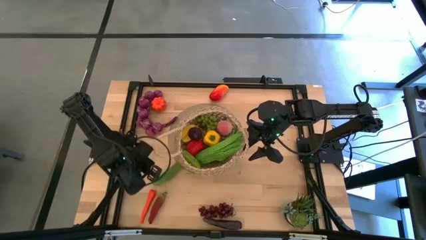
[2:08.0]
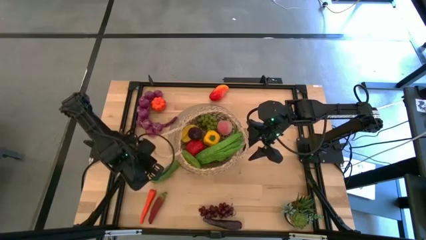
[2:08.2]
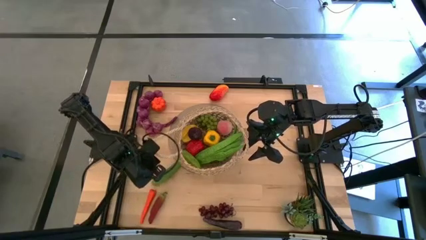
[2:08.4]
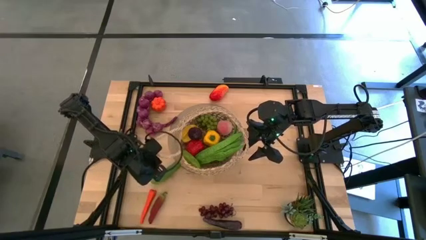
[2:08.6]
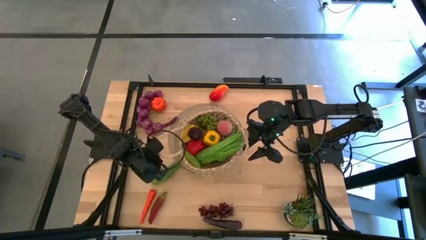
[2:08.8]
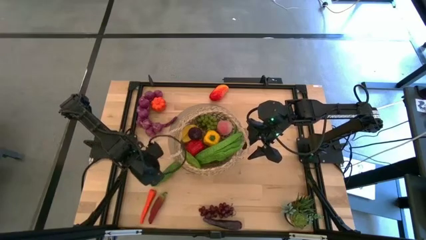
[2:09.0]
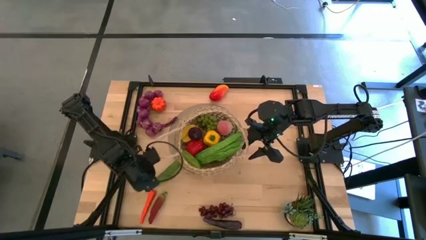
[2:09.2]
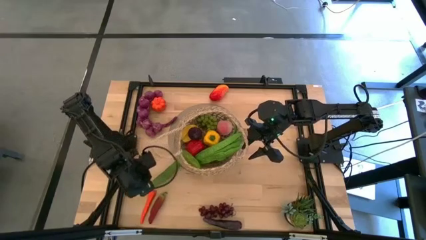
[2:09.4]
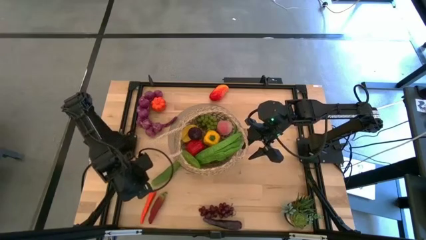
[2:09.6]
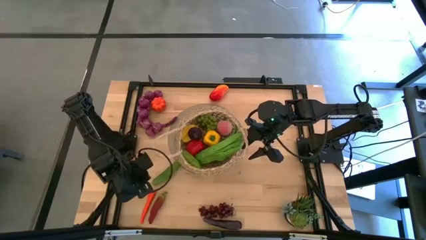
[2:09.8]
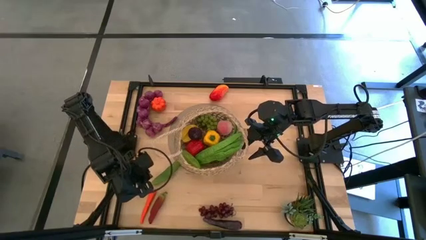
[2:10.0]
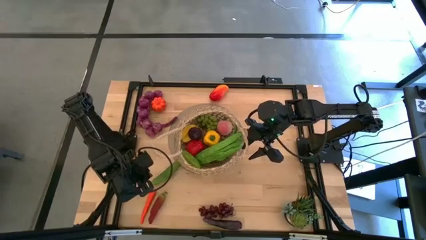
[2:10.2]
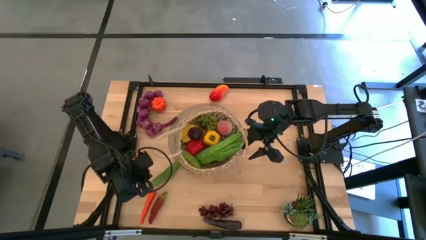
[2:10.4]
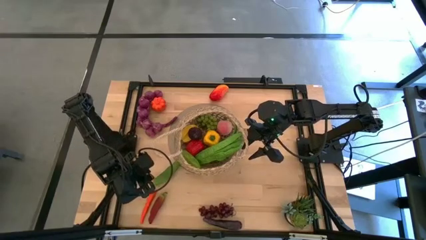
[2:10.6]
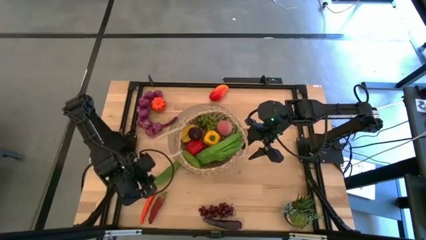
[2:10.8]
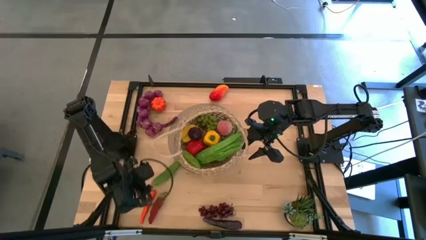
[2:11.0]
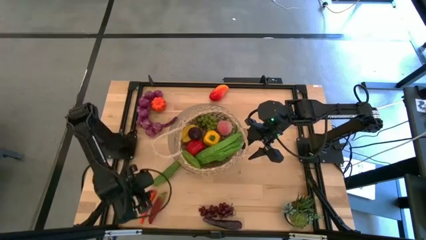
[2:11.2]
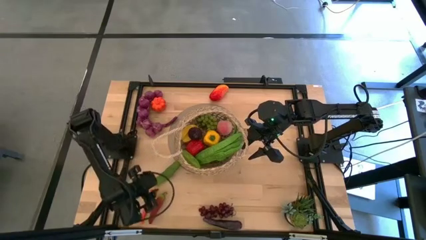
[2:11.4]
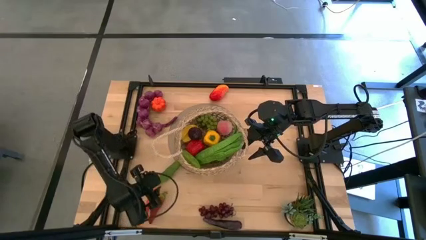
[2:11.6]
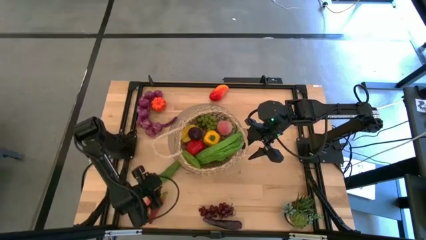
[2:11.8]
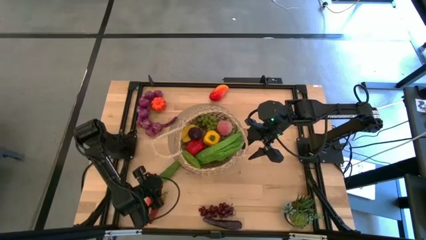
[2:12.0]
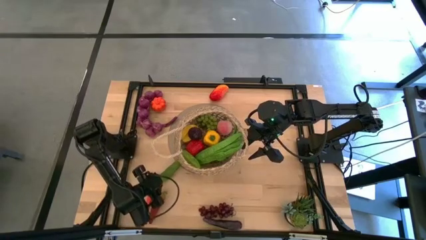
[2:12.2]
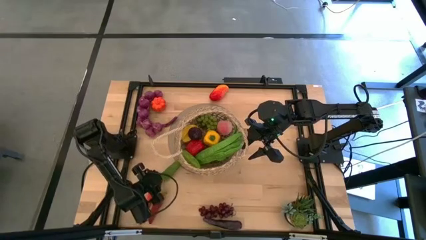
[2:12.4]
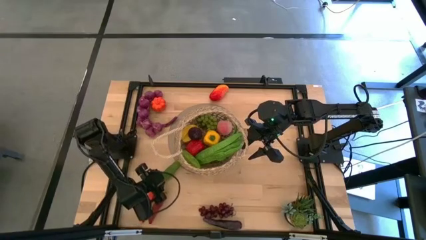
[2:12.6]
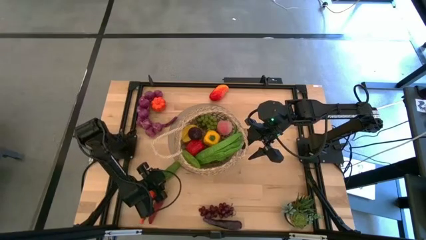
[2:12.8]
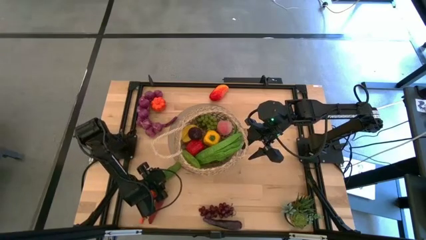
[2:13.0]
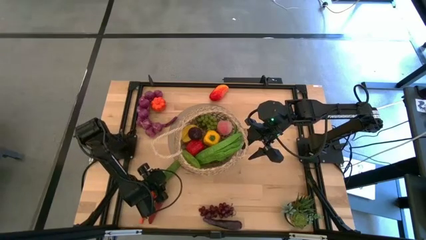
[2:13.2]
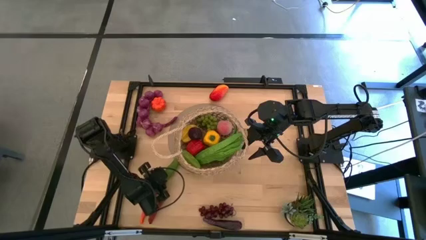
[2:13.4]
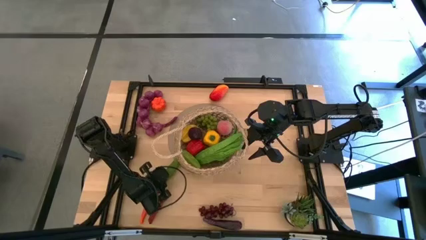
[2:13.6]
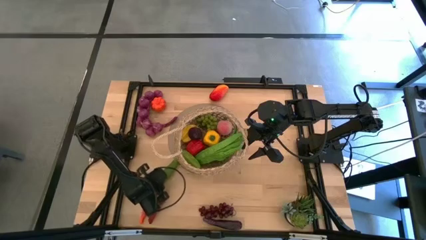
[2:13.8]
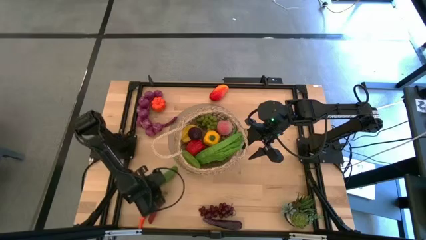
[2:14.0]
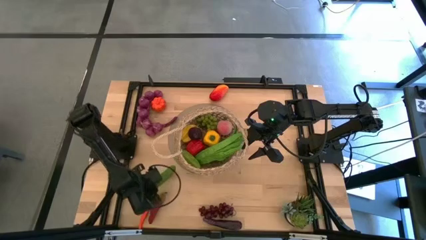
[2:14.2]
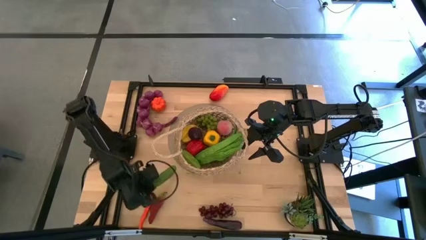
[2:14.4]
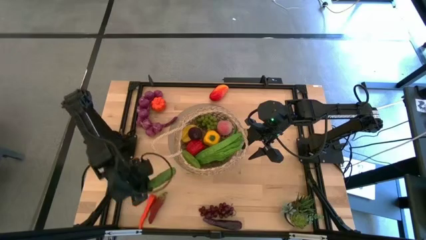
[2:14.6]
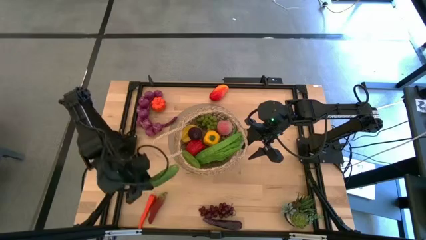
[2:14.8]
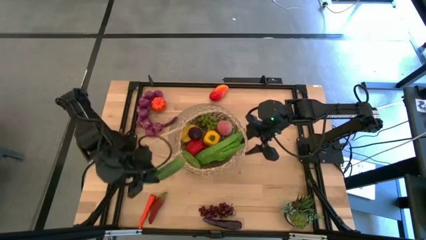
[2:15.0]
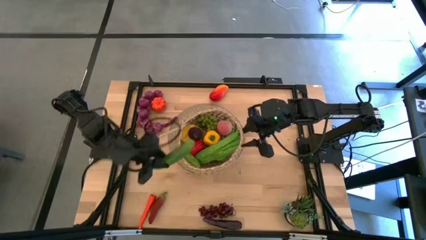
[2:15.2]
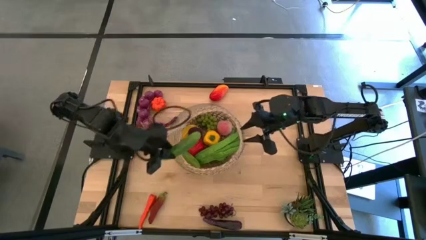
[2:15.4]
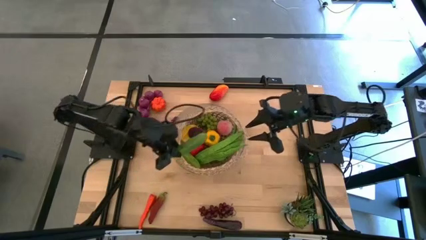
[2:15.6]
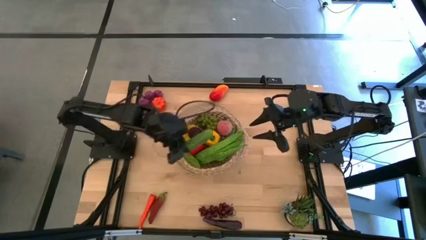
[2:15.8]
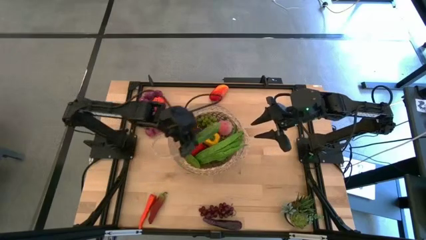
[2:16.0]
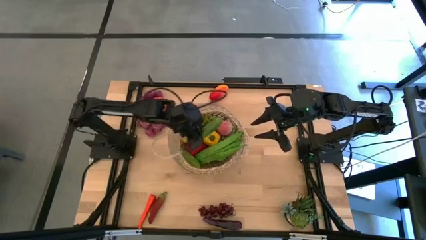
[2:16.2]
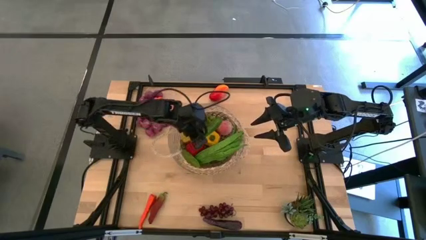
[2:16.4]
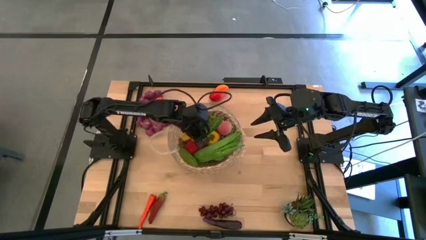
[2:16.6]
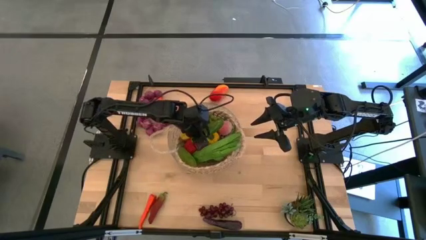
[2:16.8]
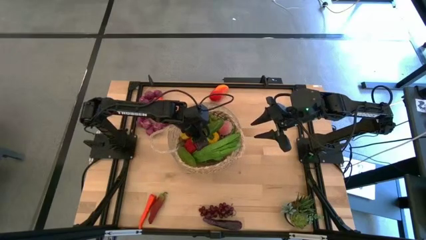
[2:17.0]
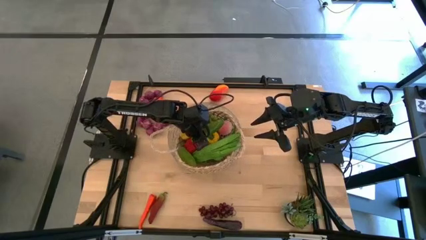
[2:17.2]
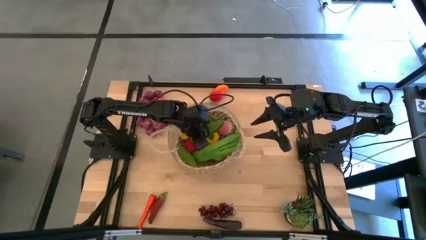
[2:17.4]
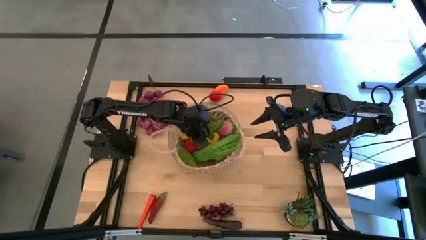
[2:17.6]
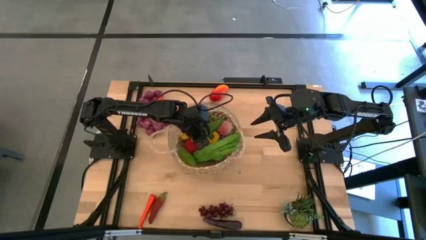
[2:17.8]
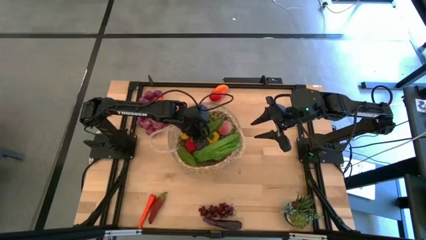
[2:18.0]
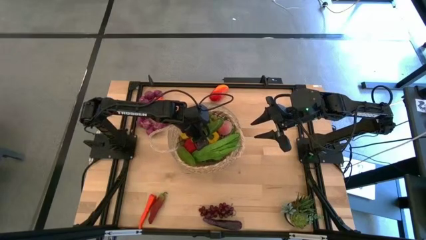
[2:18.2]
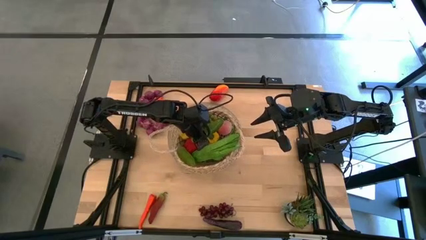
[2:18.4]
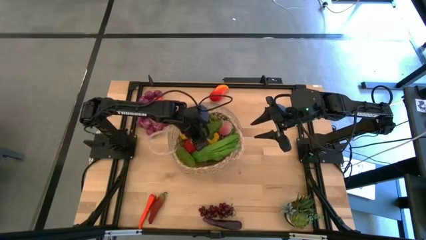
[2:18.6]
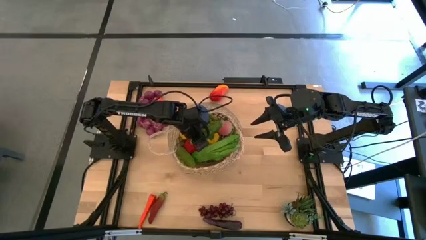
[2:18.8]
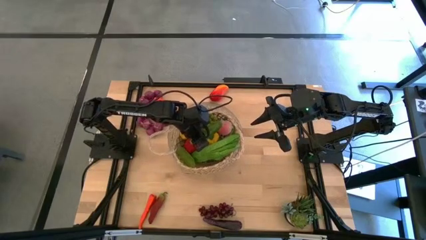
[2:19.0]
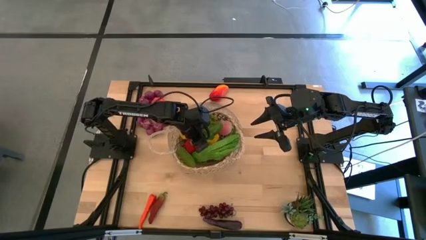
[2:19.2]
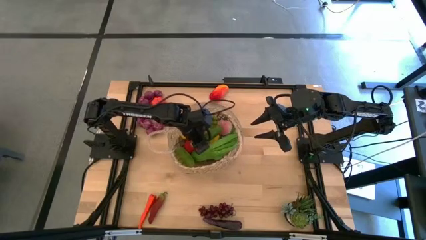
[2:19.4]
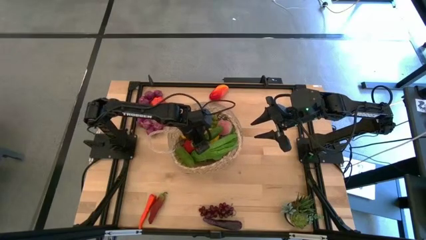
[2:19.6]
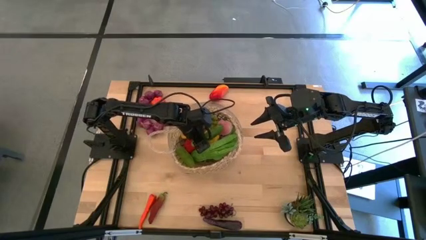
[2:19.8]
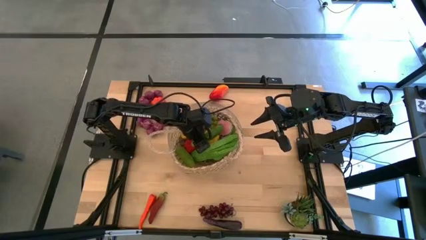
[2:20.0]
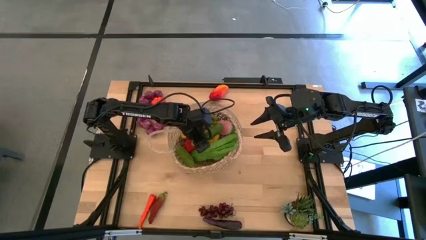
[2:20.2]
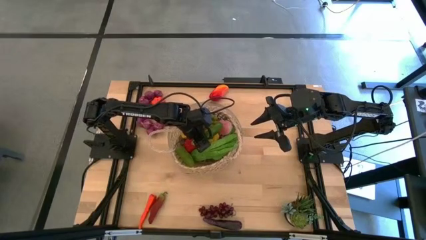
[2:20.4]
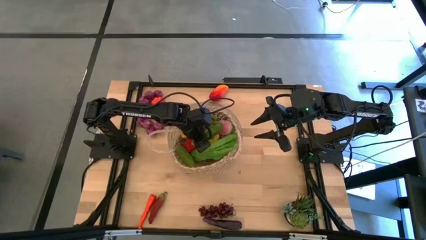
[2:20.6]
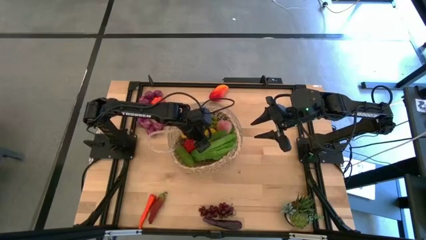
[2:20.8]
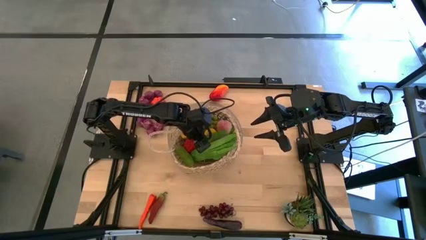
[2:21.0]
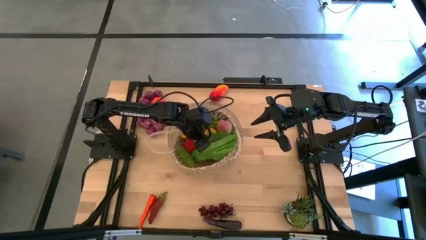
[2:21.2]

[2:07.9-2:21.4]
Task: Build produce basket
Put the green cucumber into the brown basket
